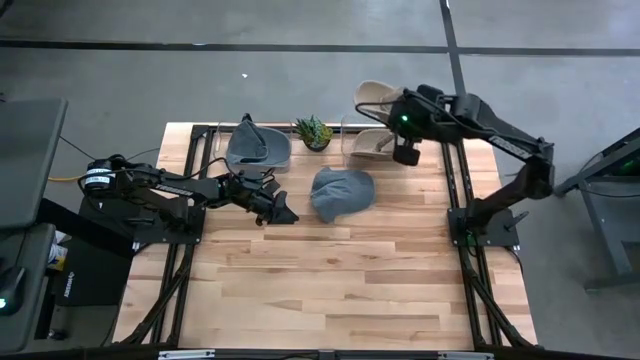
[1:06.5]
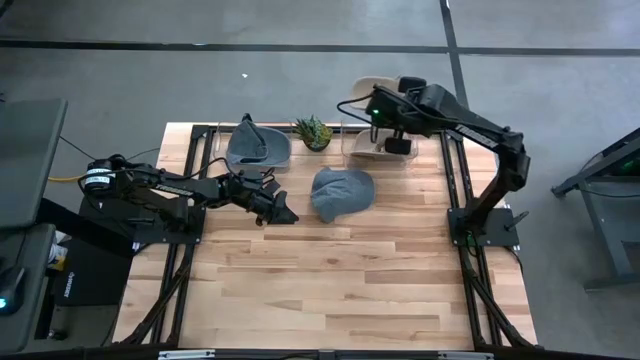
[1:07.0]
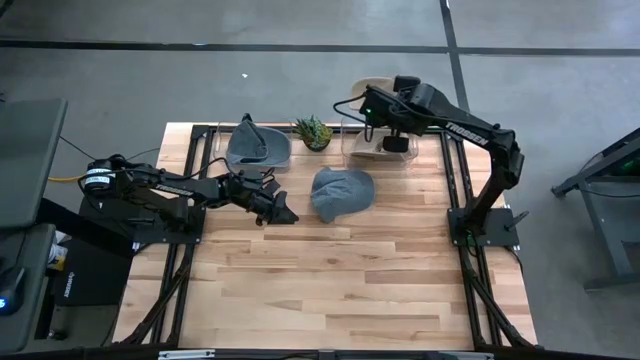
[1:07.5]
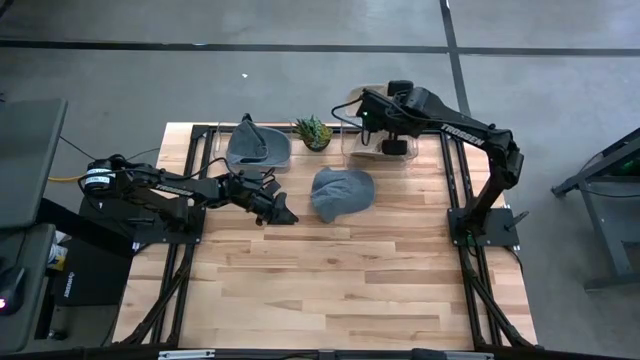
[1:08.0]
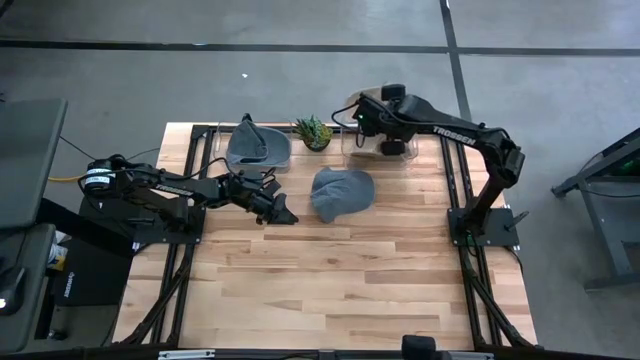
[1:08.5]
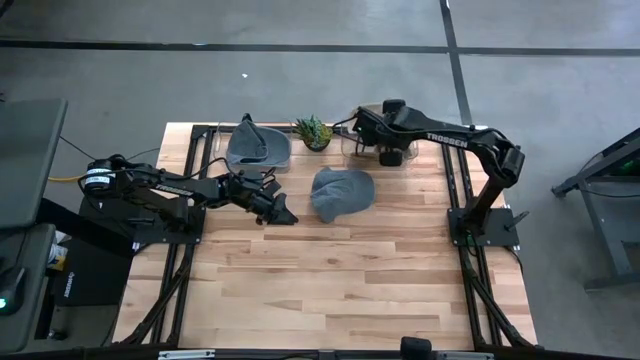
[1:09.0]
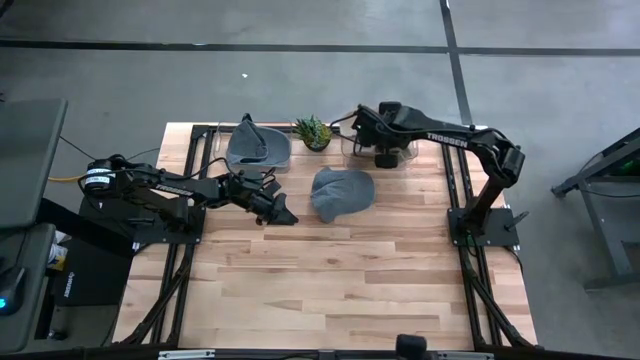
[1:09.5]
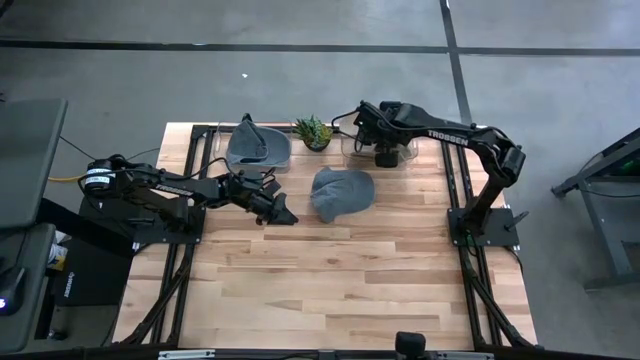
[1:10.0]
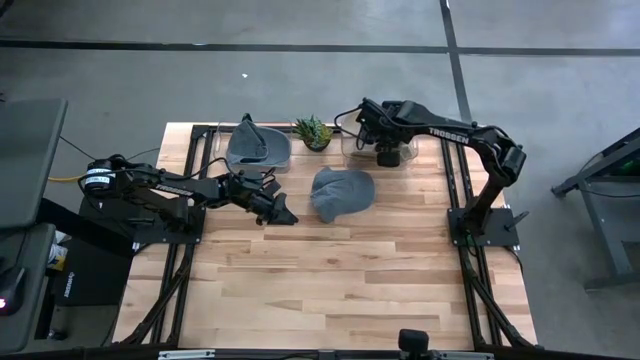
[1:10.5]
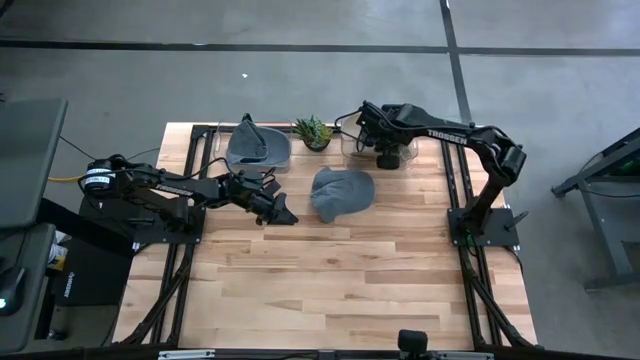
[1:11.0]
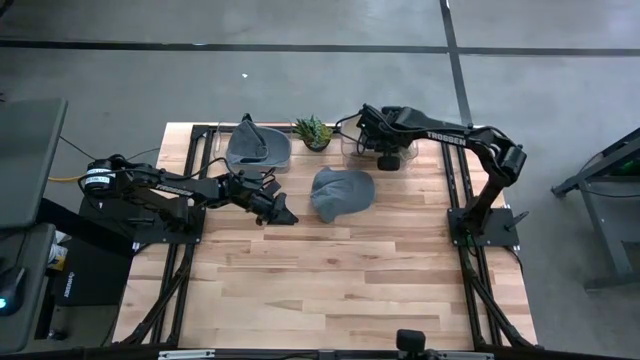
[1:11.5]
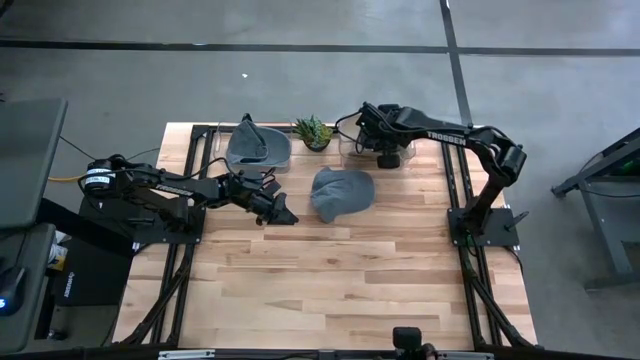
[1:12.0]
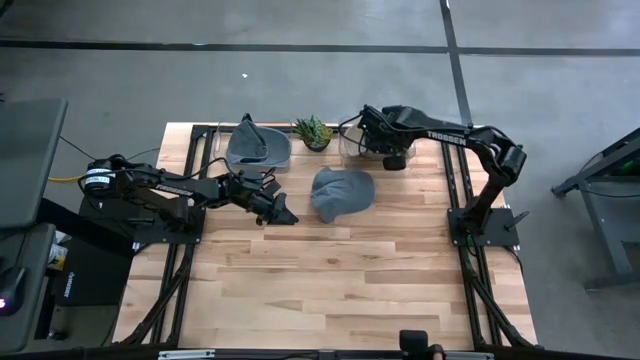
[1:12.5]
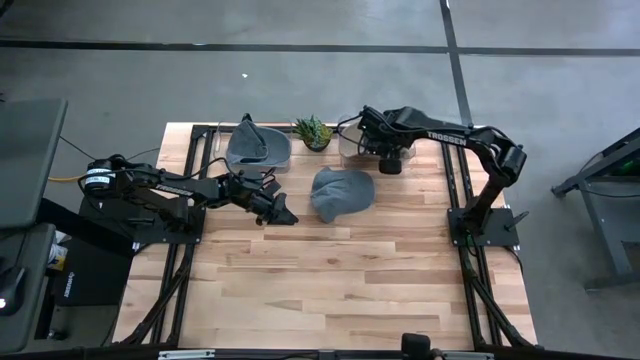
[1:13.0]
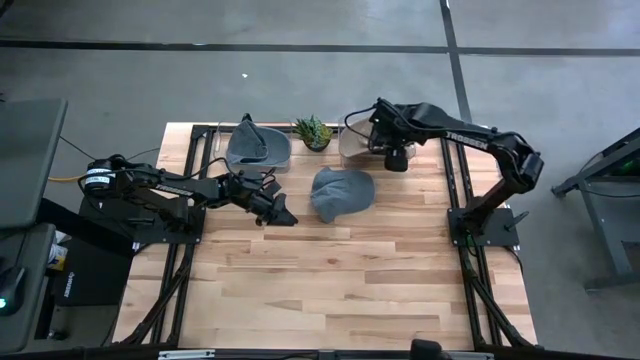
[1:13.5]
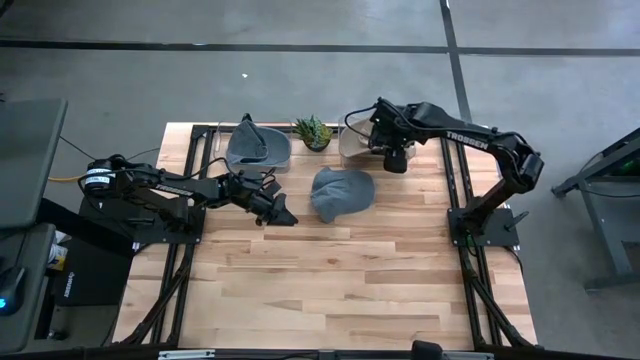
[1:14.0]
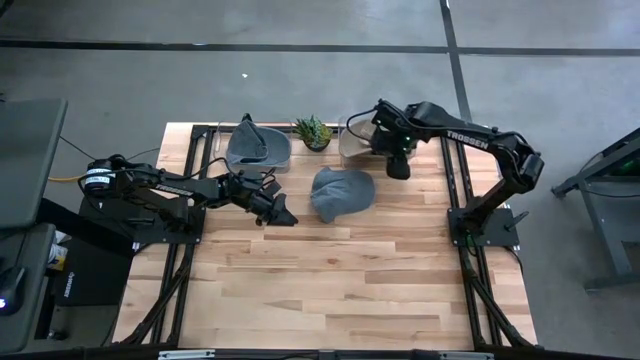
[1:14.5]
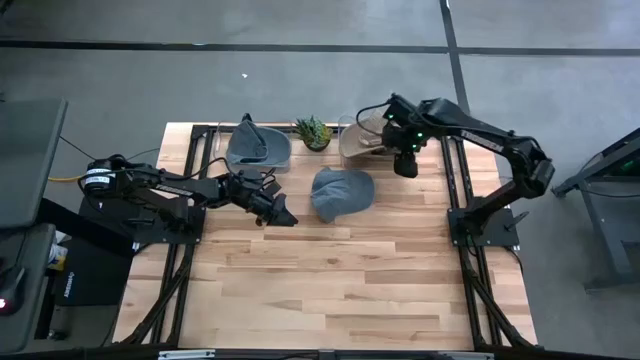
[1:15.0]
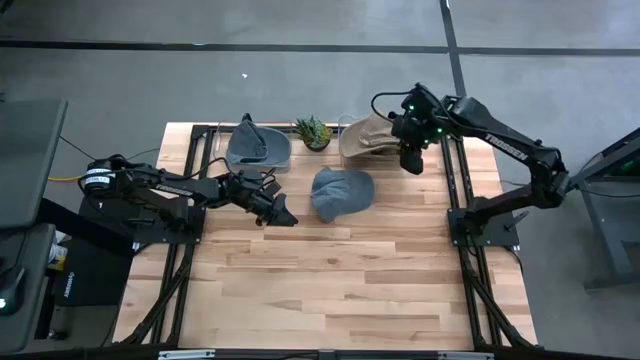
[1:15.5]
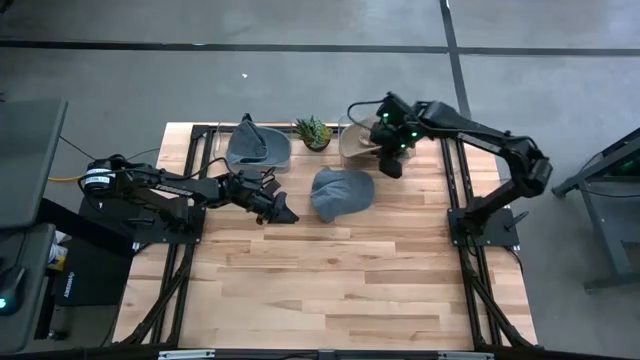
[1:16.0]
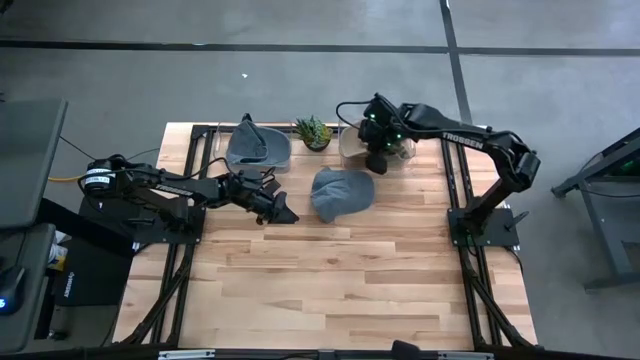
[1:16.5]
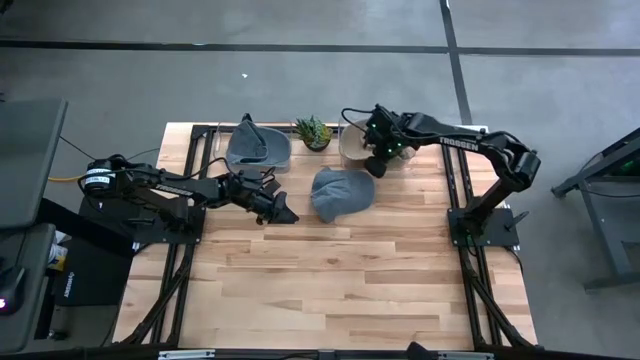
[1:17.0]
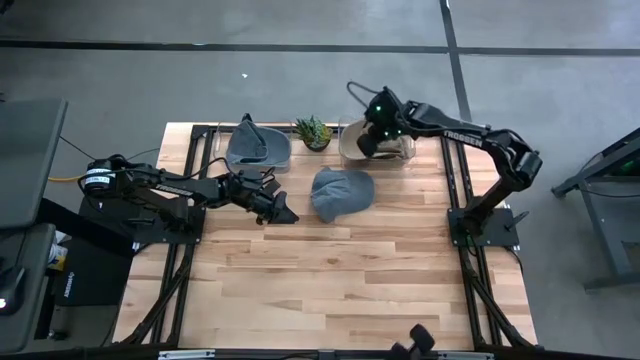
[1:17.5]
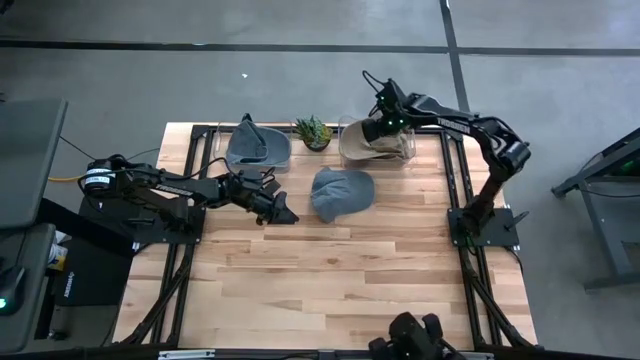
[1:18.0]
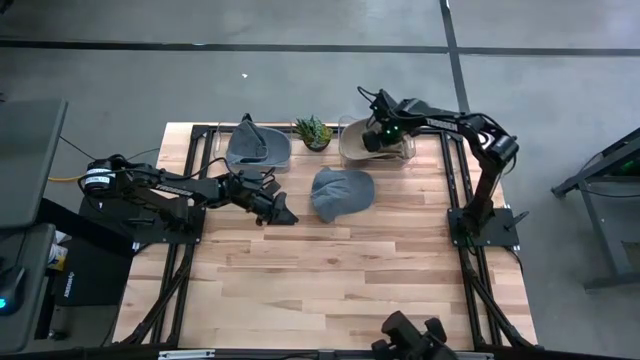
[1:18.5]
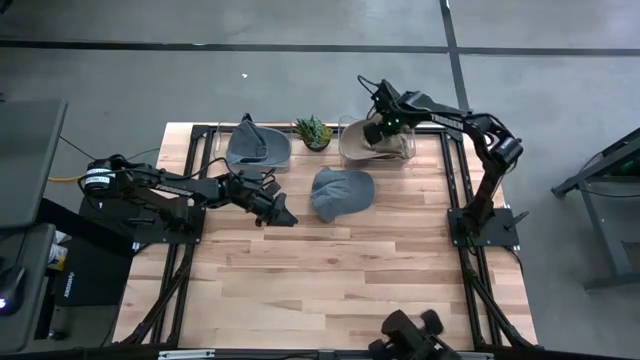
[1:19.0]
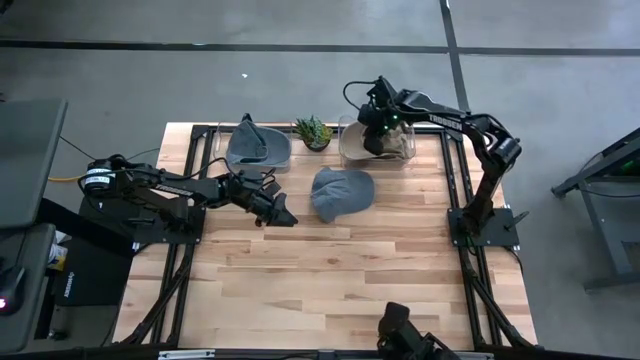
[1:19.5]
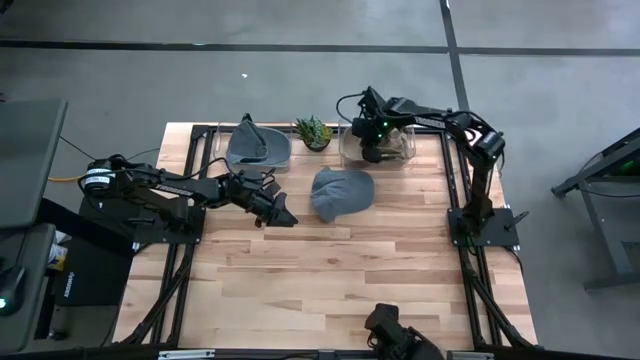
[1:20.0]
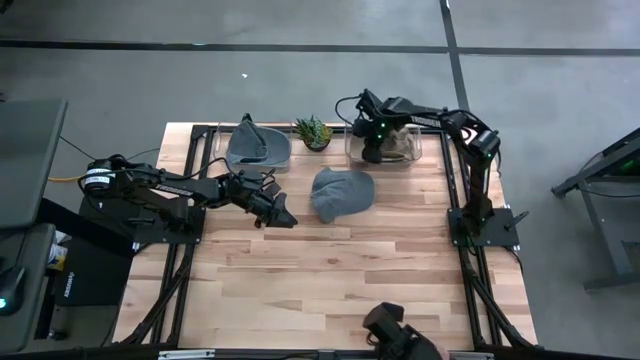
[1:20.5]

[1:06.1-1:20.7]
Task: Pick & Place hat
Put the brown cap into the right transparent bin

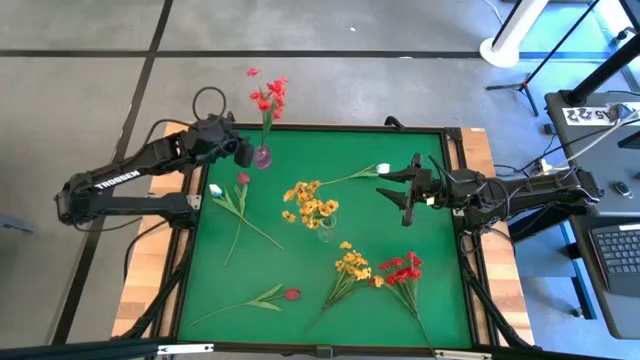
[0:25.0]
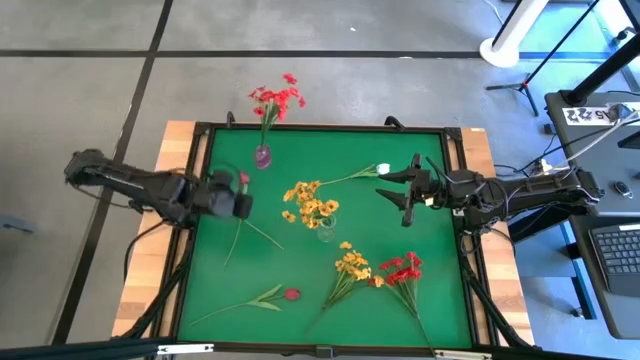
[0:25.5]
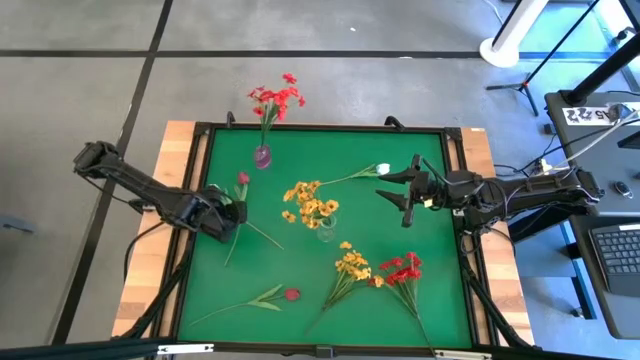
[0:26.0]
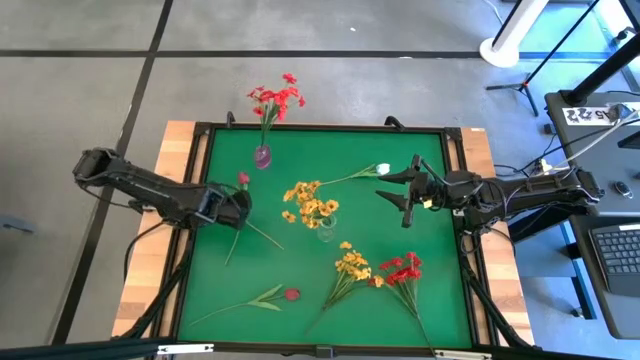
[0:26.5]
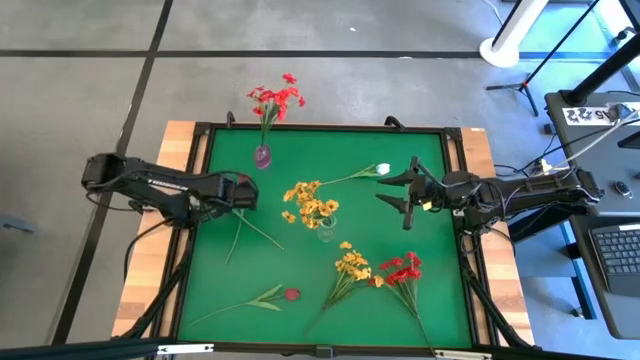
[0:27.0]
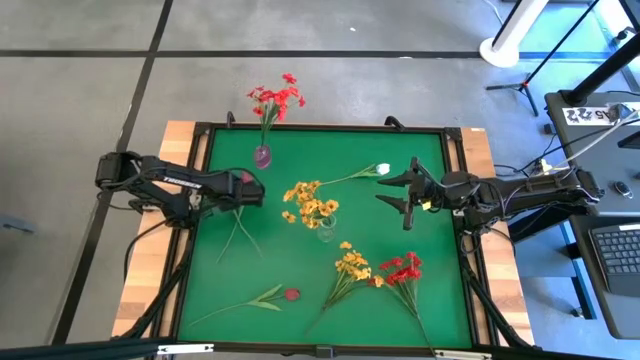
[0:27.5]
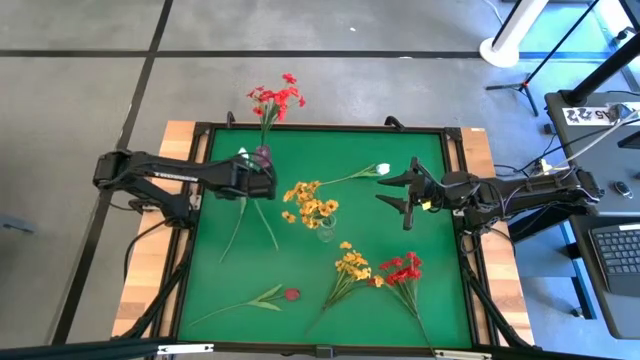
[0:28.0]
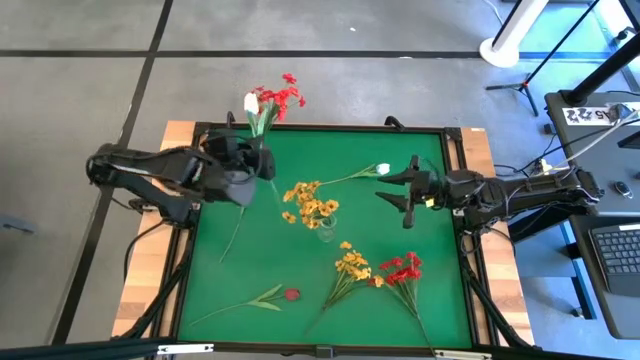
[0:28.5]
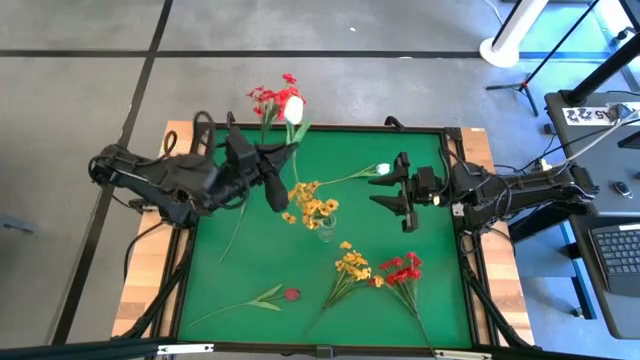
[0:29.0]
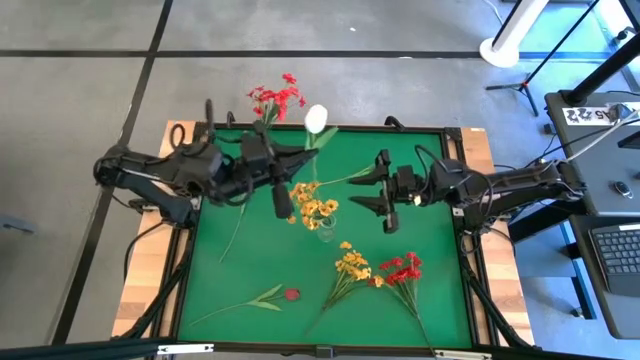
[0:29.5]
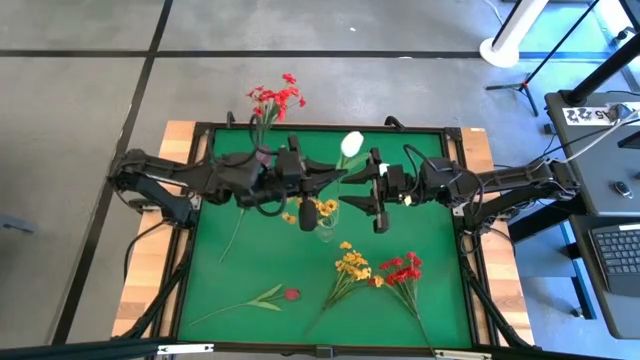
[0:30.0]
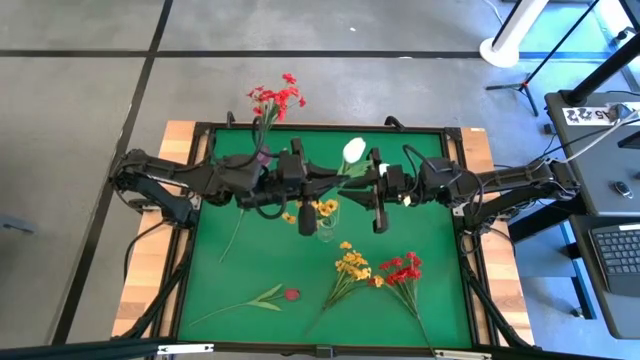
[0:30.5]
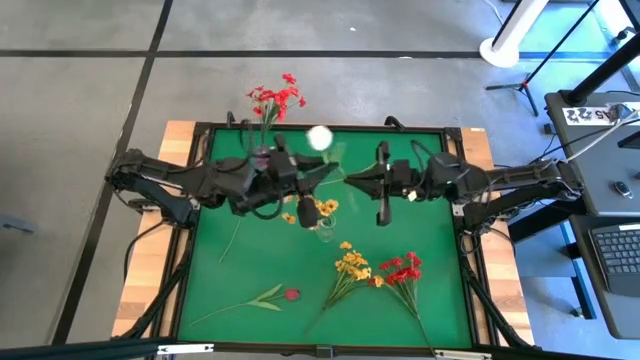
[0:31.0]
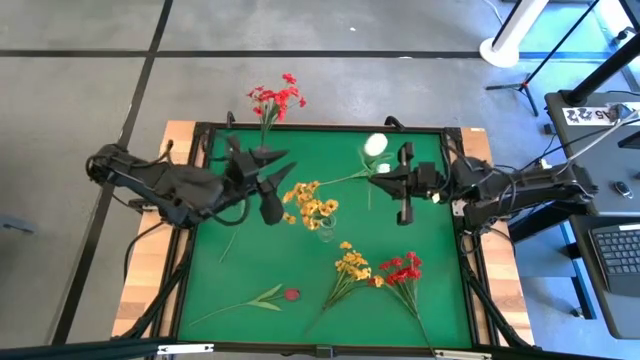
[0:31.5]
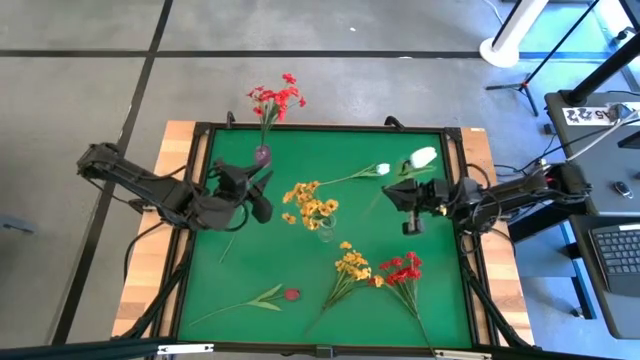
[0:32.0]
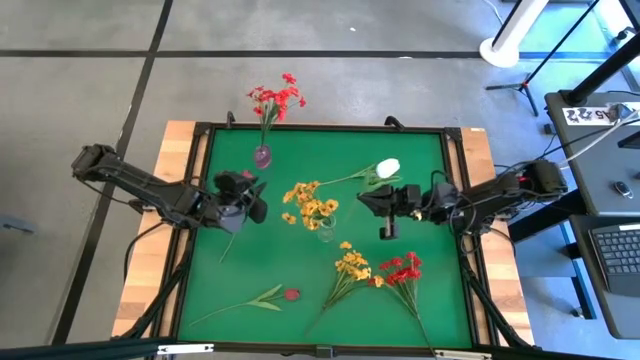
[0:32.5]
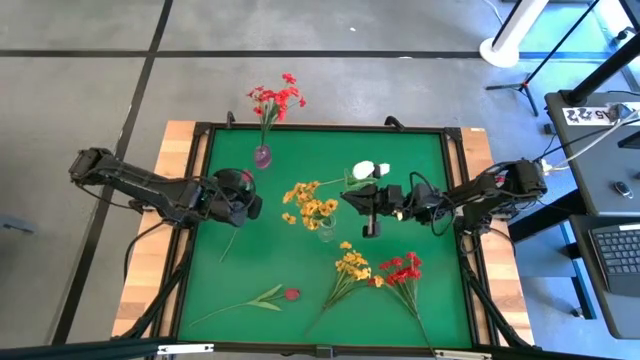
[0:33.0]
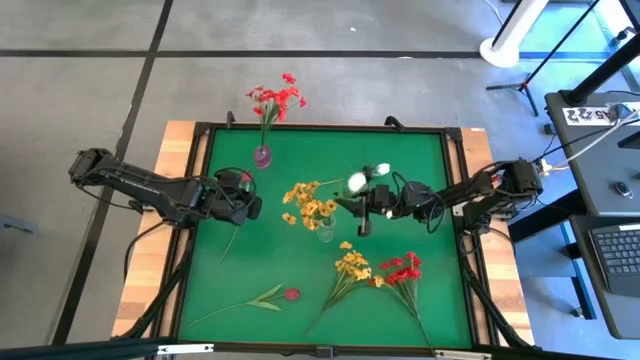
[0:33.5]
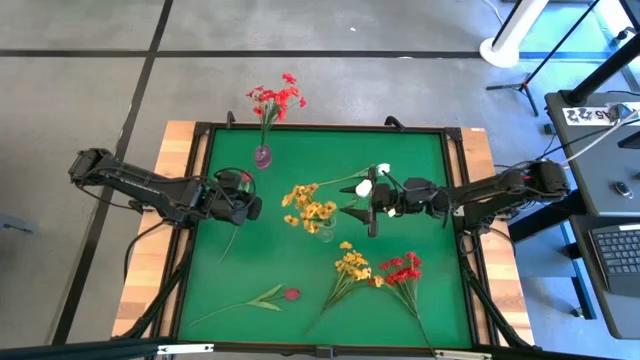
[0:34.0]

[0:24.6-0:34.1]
Task: Sort flowers into vase by color
Put the left white flower into the transparent vase
